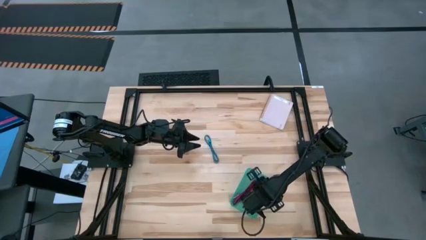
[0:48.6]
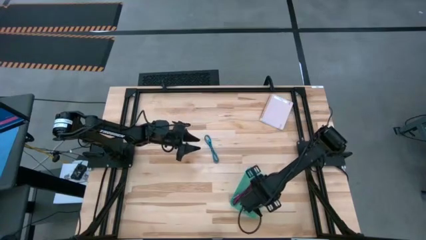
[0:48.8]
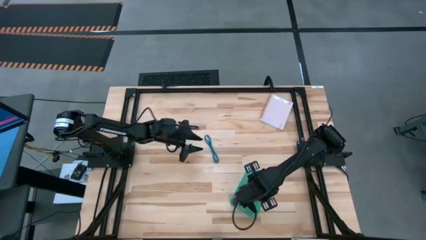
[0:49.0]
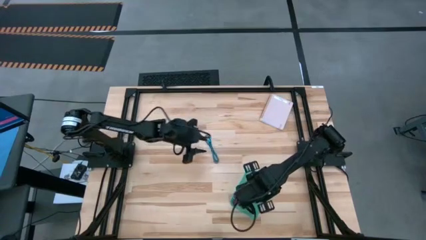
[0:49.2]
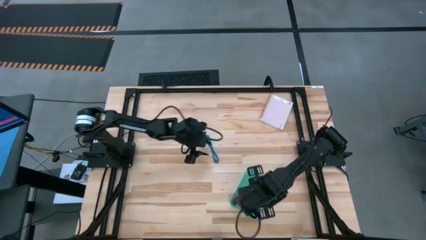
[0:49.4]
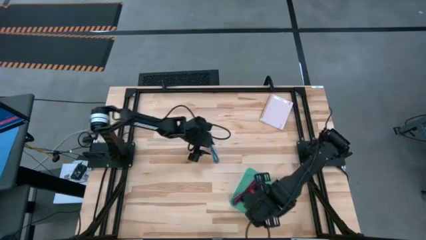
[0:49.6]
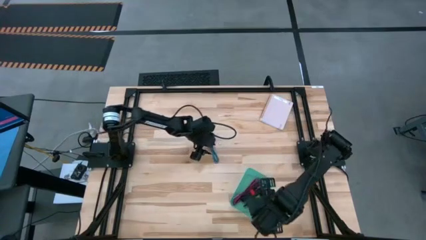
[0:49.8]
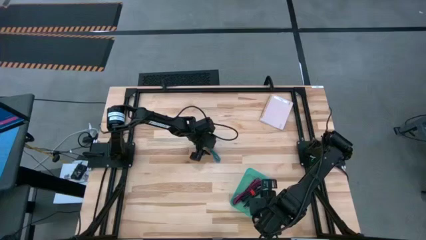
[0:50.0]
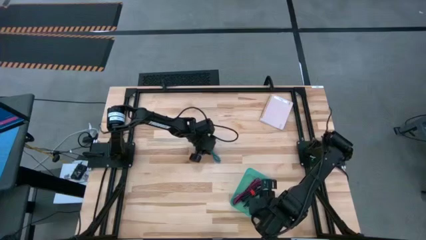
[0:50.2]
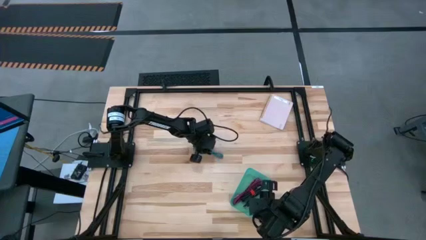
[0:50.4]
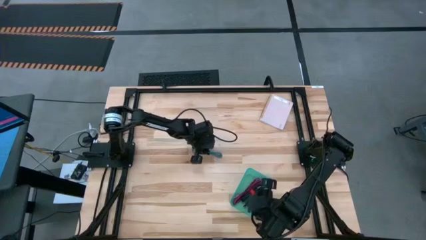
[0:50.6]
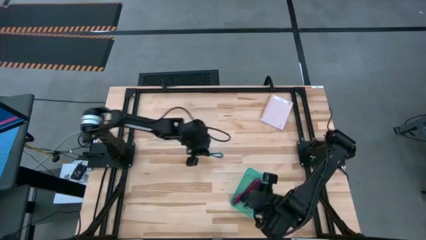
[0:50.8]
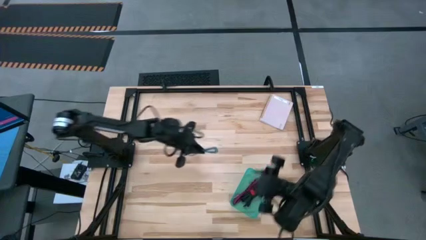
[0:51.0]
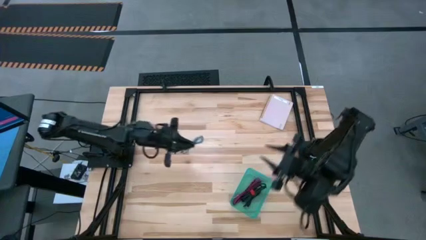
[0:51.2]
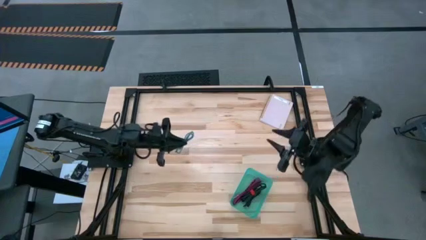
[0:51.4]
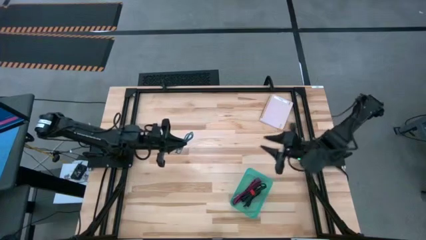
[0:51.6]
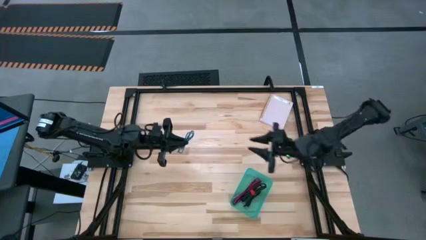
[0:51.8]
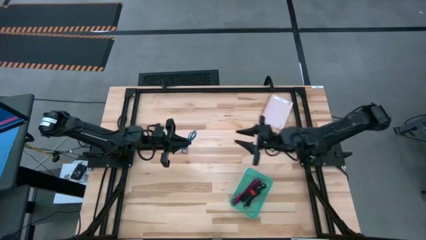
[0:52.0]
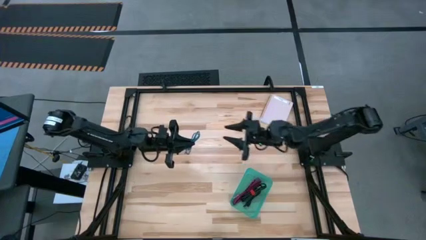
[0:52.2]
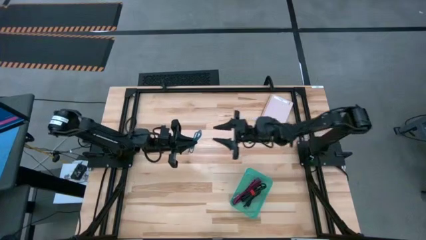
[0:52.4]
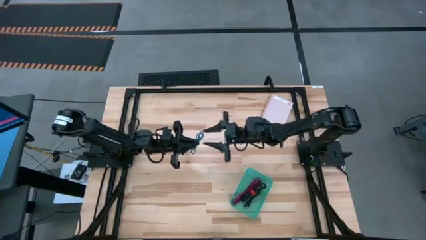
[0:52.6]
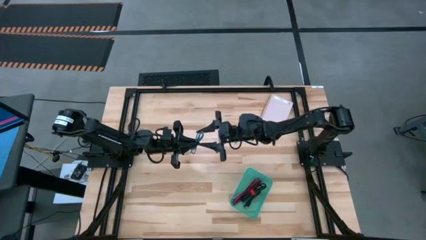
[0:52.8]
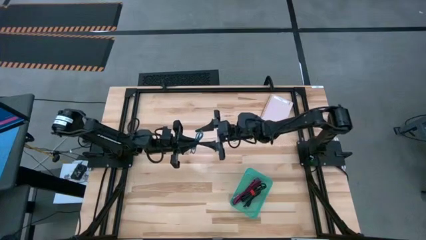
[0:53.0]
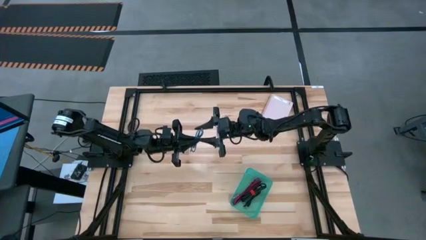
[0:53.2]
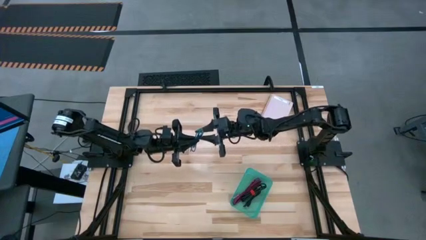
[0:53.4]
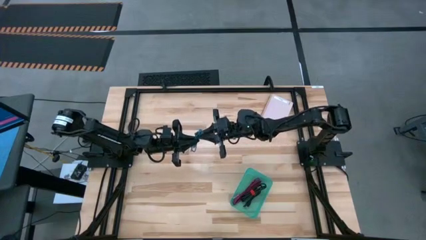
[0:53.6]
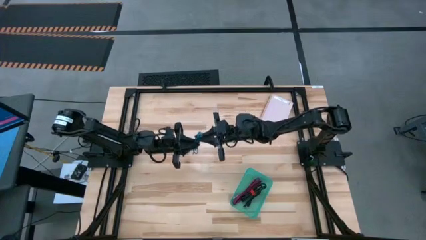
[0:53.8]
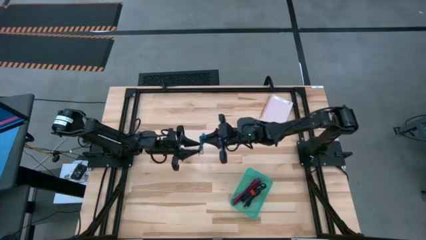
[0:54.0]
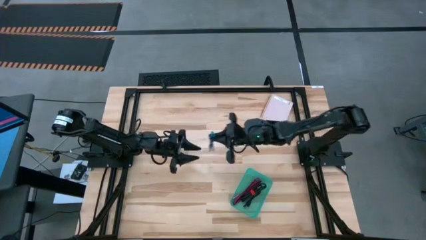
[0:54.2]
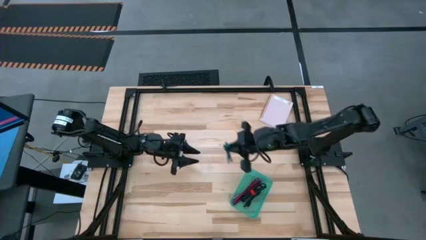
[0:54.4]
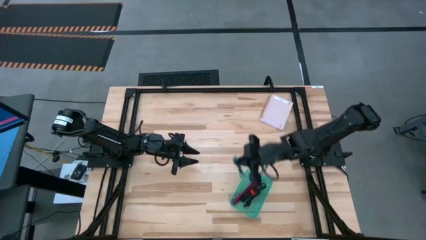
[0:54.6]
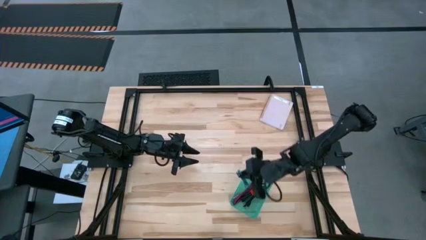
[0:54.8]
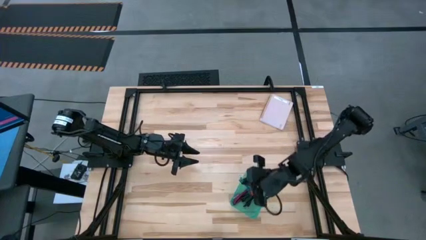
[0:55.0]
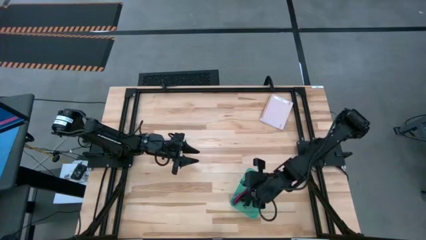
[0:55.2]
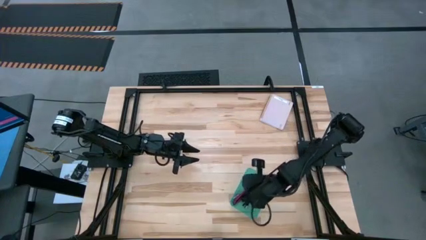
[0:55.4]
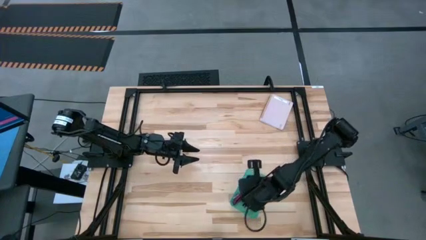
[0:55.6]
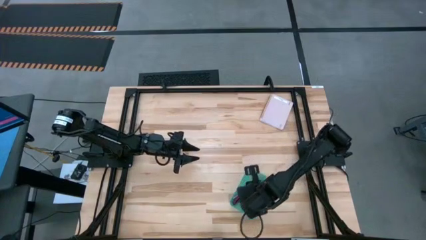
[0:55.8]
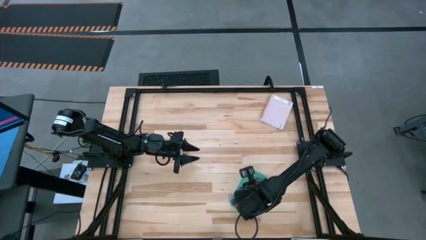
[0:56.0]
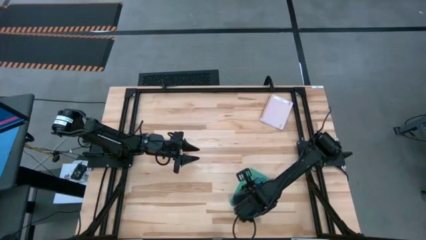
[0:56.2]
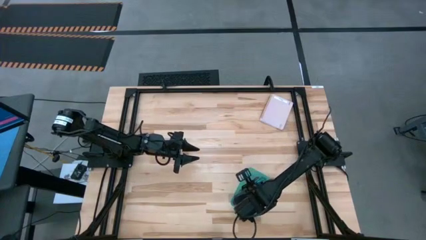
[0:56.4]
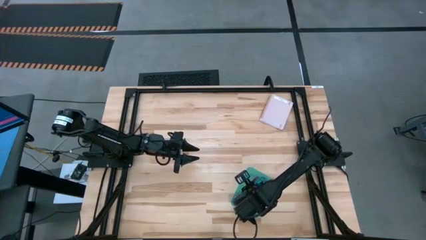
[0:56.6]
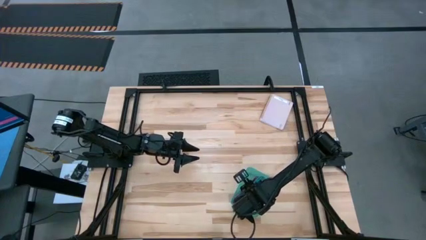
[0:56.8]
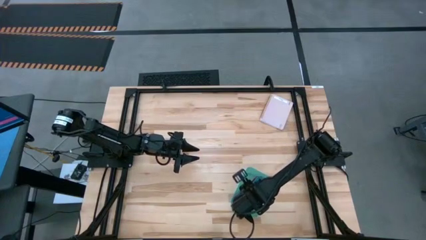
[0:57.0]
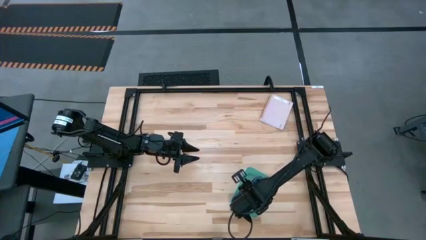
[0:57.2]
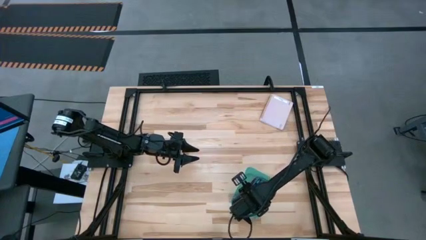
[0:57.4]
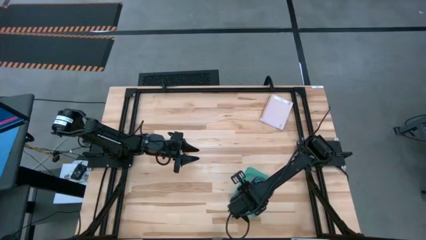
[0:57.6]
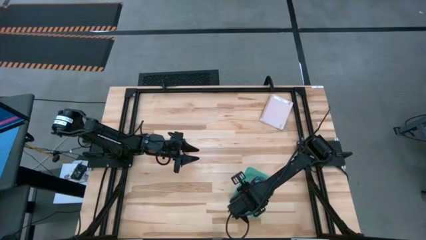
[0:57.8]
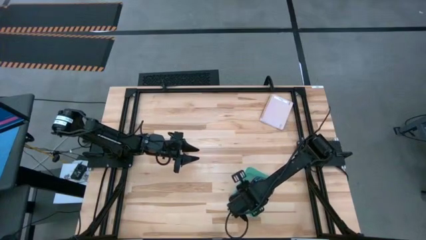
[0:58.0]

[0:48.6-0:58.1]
Task: Pick and place USB-C Cables
Put the blue usb cable into the bin

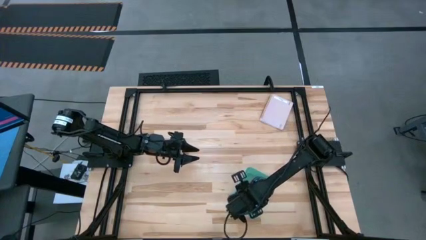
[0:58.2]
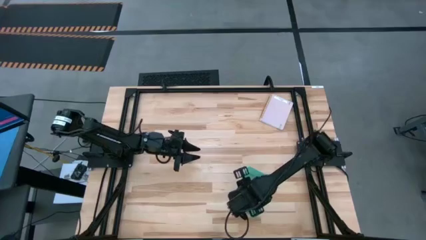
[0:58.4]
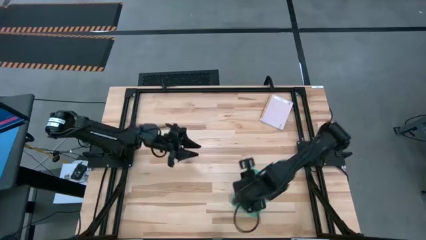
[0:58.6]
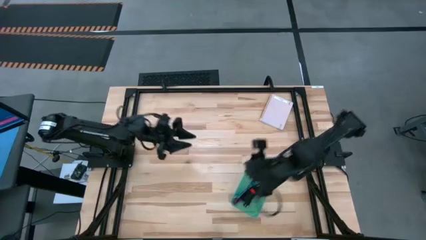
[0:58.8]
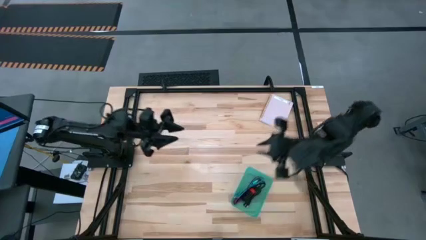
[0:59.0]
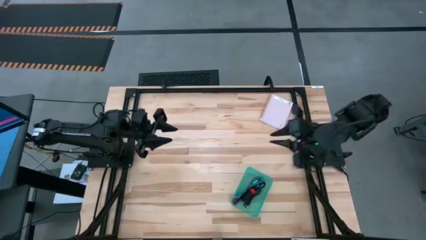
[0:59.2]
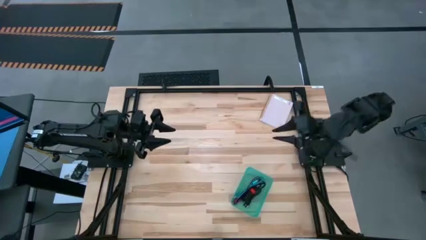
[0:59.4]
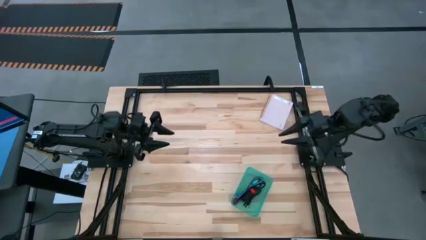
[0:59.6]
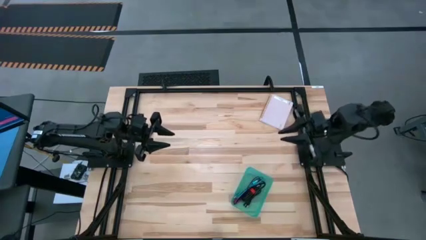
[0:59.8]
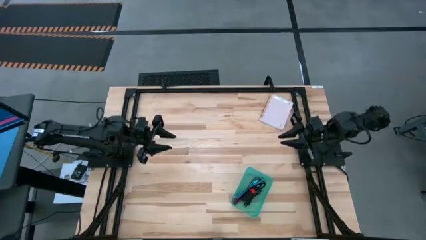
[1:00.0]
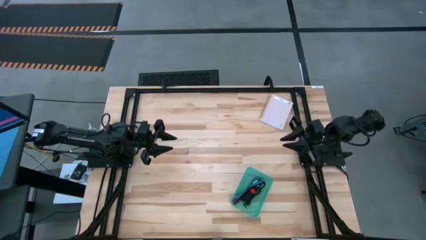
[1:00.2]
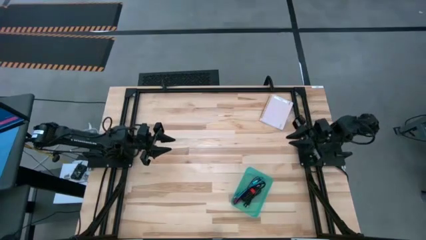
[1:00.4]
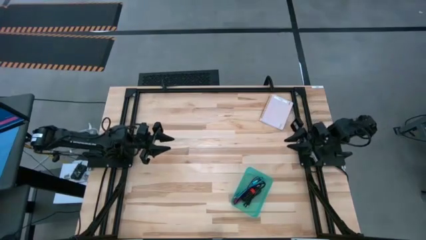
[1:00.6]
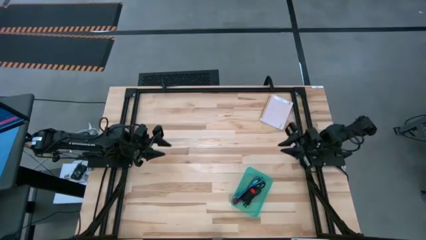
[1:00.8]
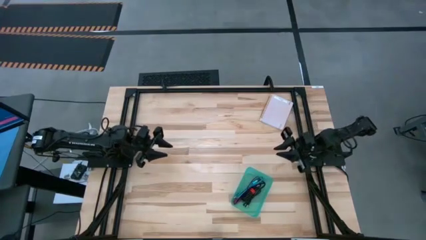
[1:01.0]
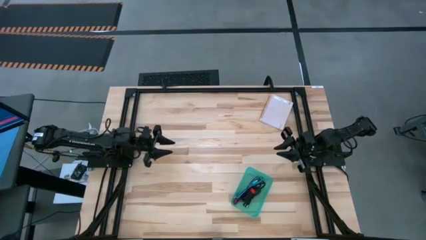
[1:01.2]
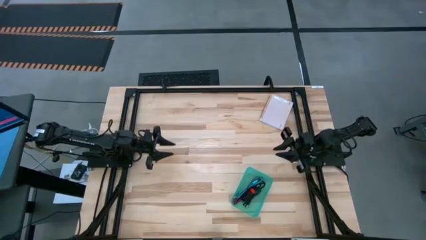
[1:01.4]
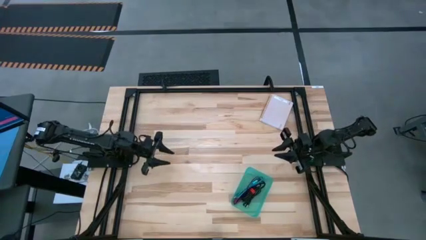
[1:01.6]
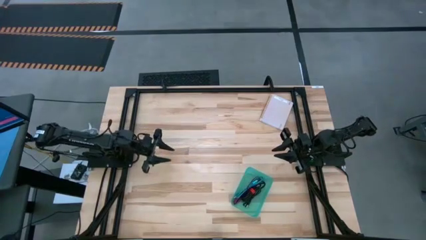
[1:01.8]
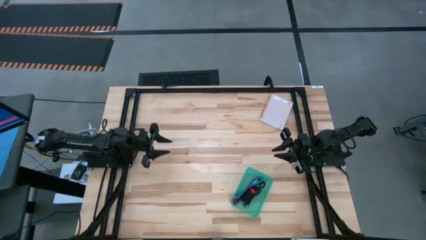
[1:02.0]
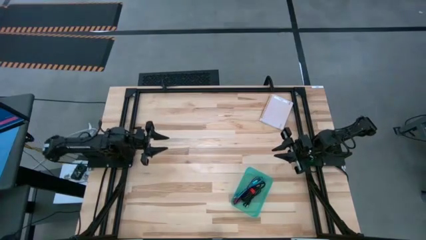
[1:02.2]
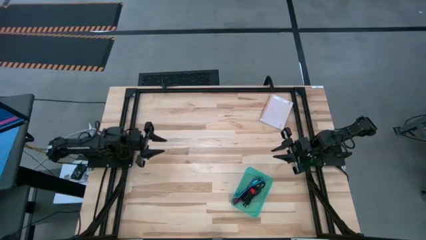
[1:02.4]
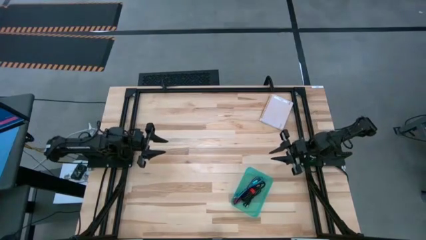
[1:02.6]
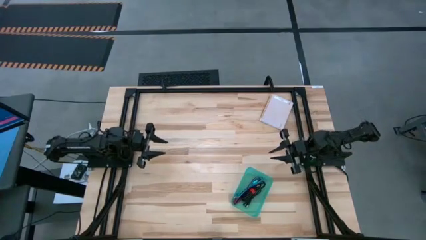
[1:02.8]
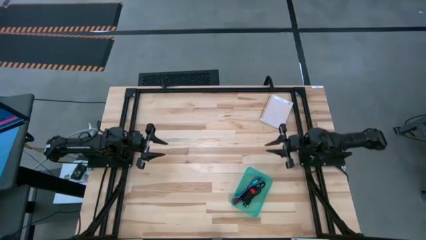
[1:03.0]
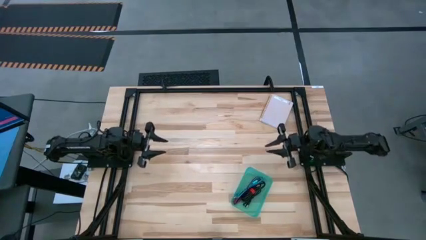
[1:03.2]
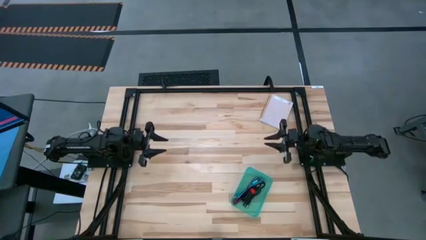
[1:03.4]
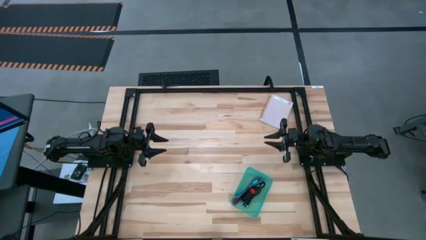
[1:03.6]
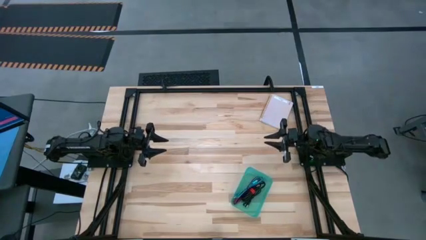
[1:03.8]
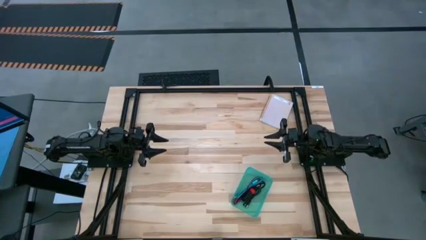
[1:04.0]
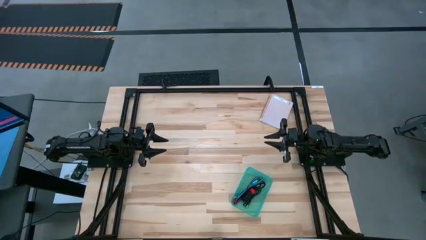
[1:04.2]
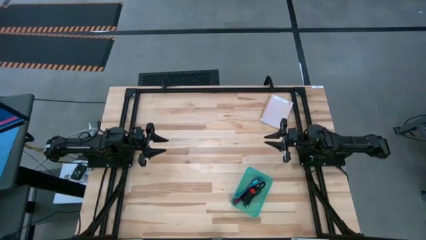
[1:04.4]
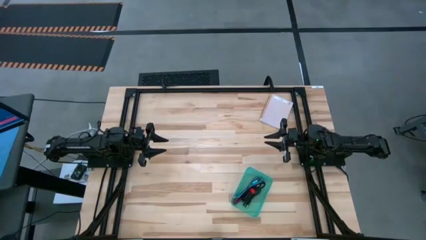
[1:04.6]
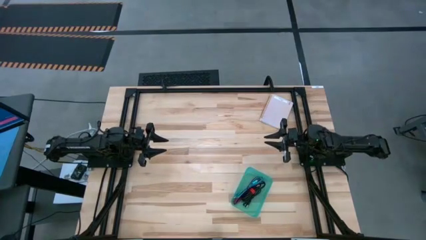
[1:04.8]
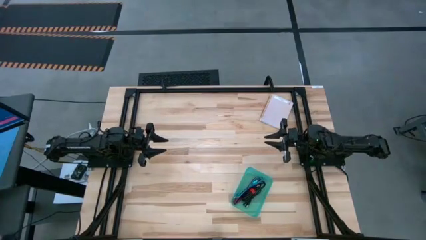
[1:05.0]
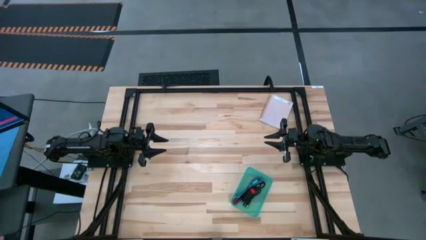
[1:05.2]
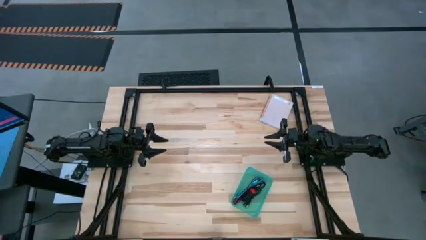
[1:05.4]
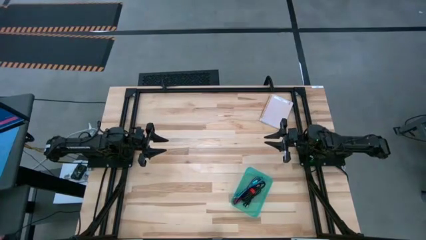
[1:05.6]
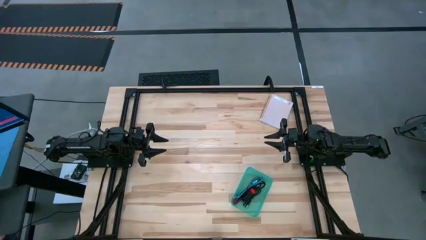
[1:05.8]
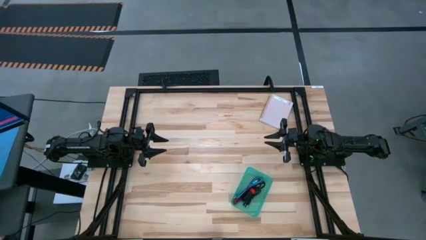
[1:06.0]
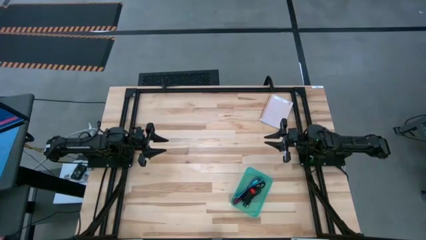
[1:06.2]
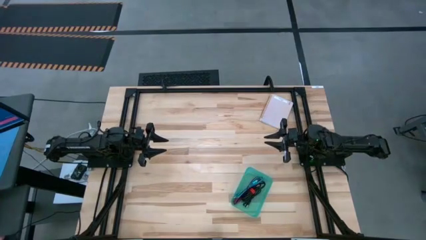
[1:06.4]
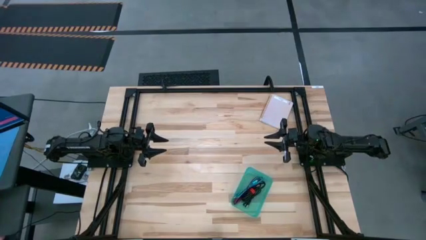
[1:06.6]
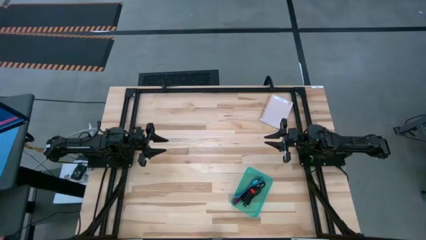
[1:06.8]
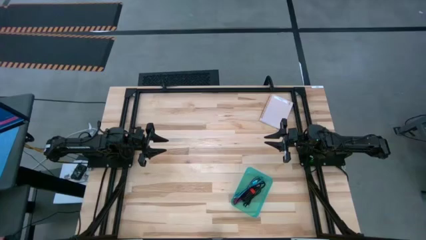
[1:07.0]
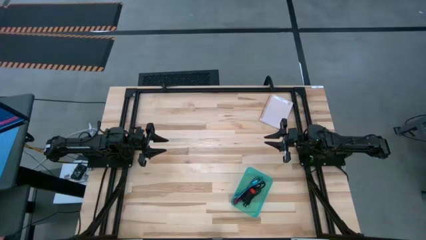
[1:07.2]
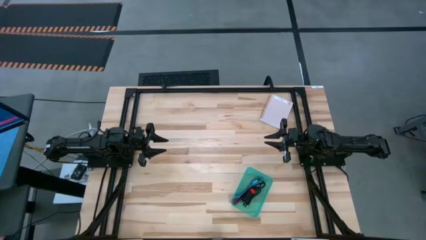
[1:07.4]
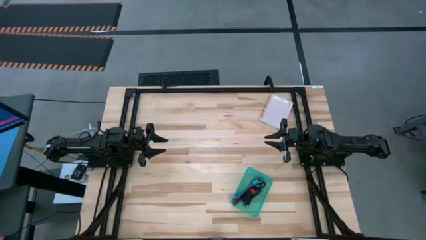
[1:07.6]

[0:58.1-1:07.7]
Return to Home Position
